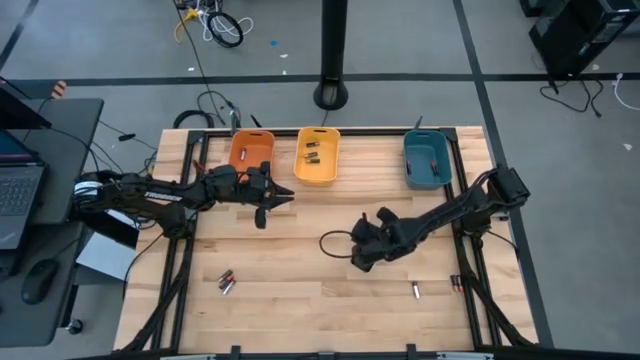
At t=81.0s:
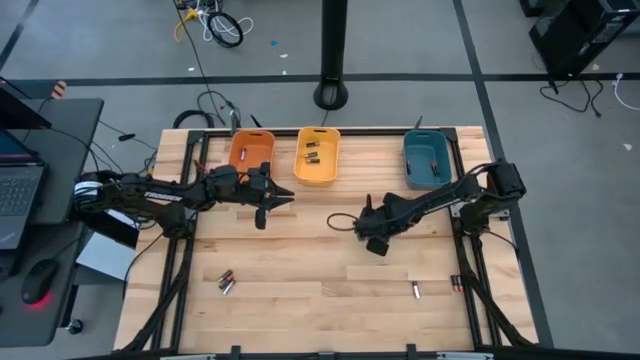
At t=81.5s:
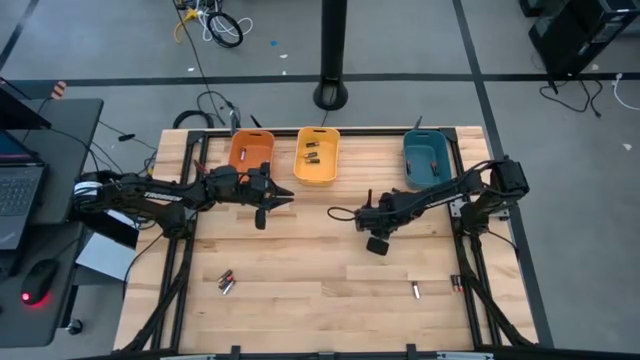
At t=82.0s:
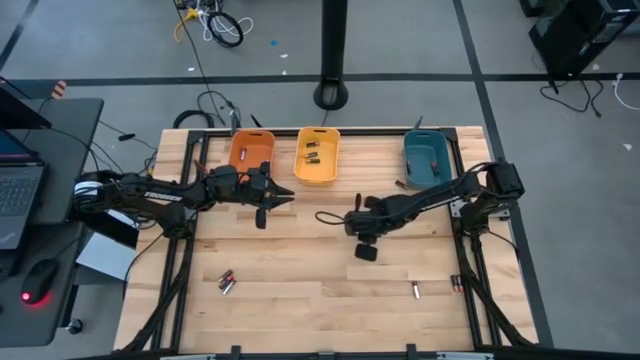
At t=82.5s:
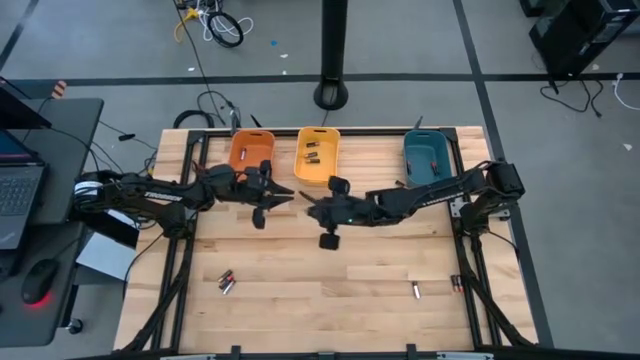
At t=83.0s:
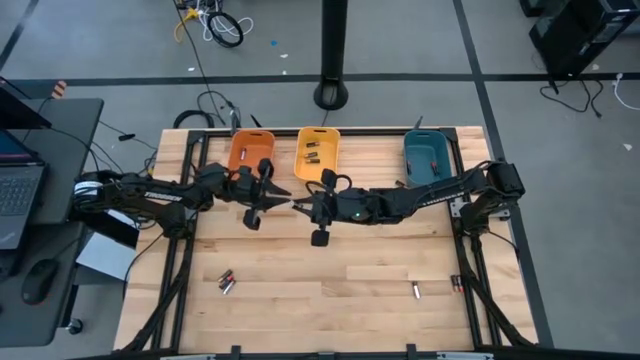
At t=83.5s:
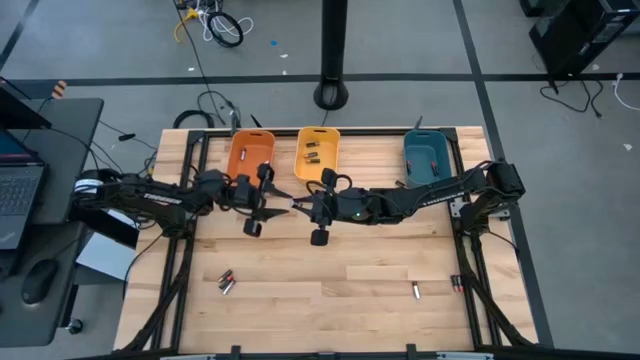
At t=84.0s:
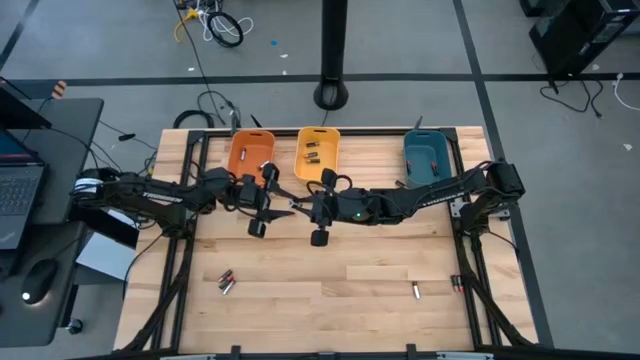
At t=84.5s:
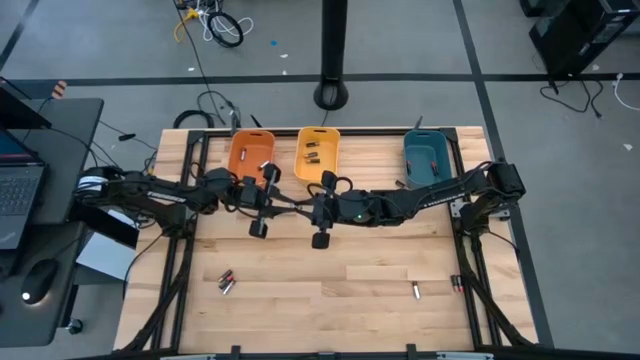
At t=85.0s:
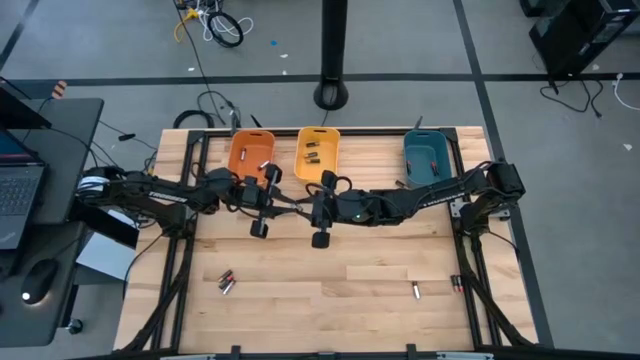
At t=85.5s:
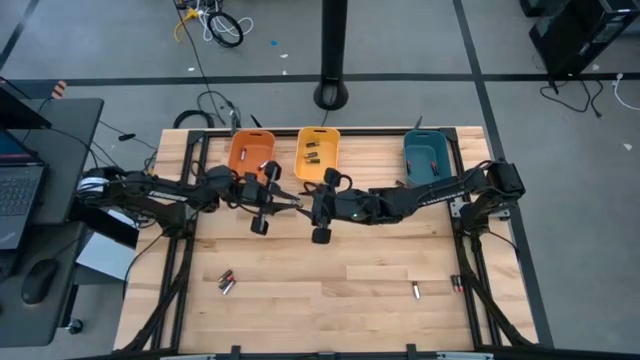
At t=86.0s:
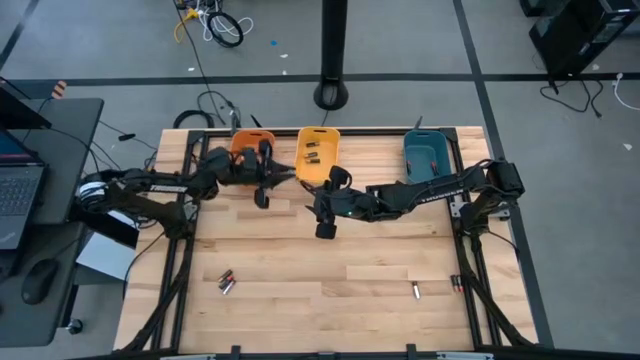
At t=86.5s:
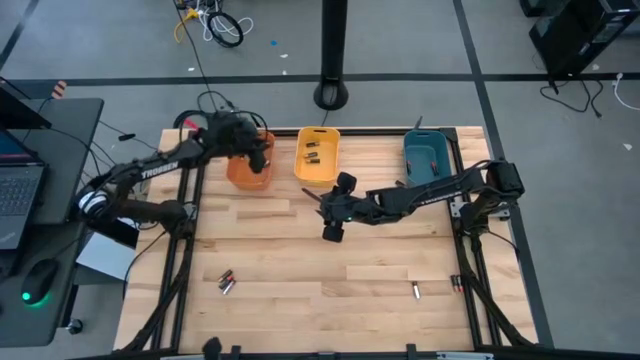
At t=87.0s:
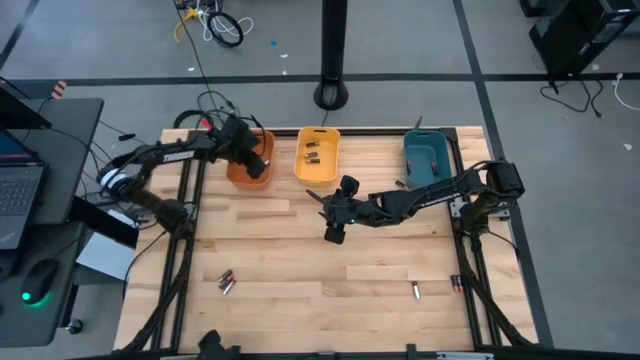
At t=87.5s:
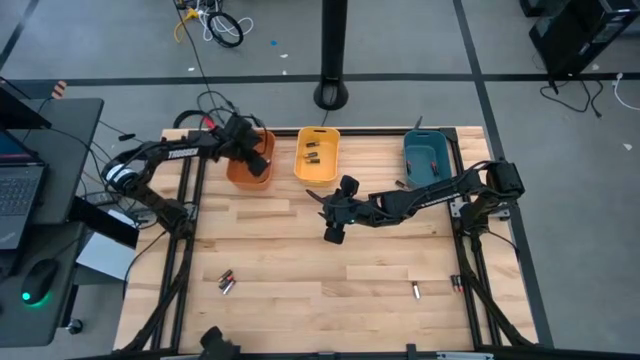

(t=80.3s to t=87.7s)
Task: Sort batteries
Put the silver battery into the orange bin

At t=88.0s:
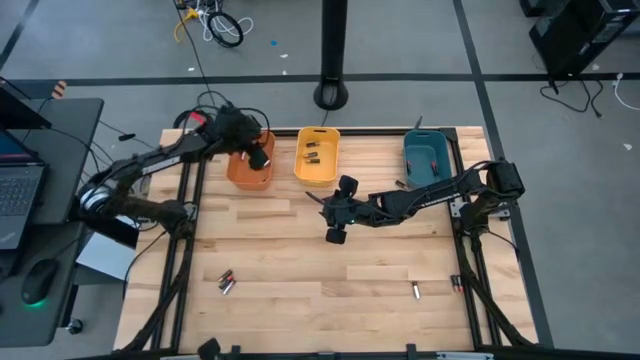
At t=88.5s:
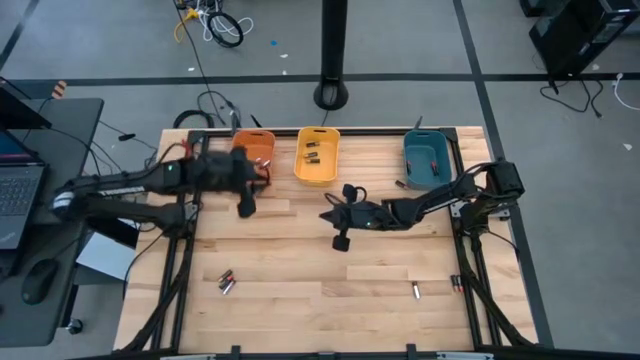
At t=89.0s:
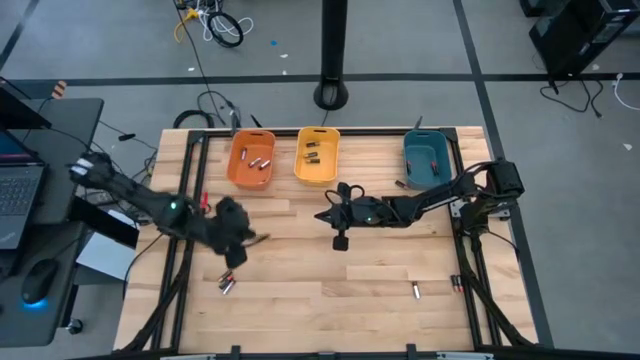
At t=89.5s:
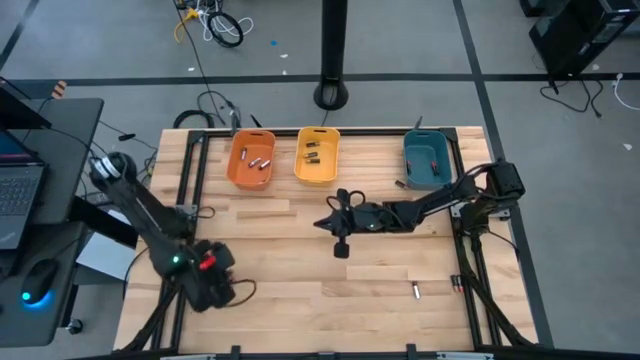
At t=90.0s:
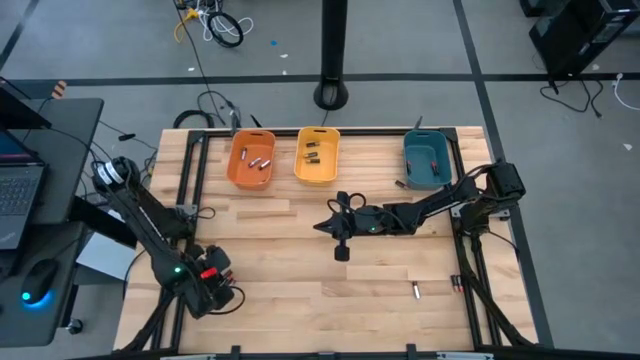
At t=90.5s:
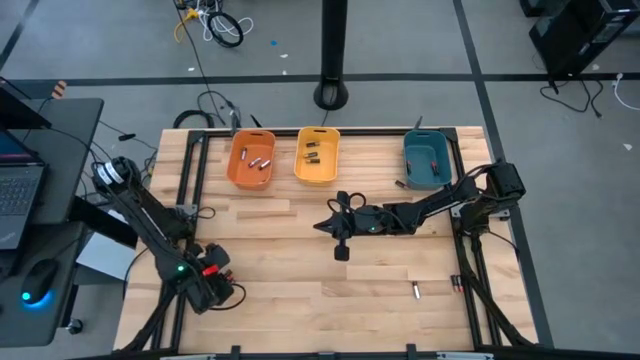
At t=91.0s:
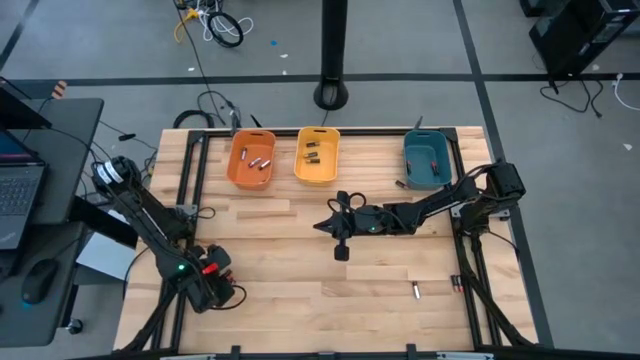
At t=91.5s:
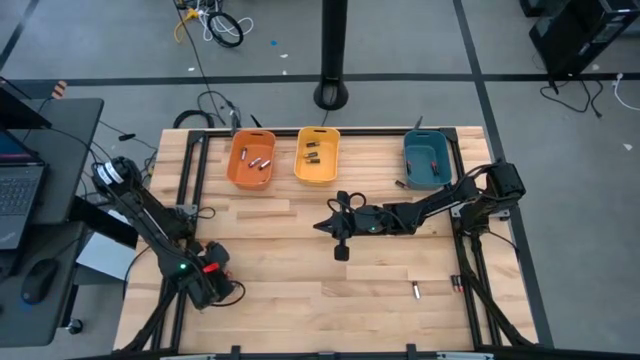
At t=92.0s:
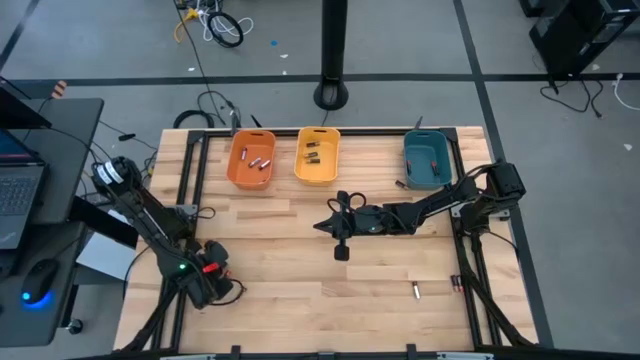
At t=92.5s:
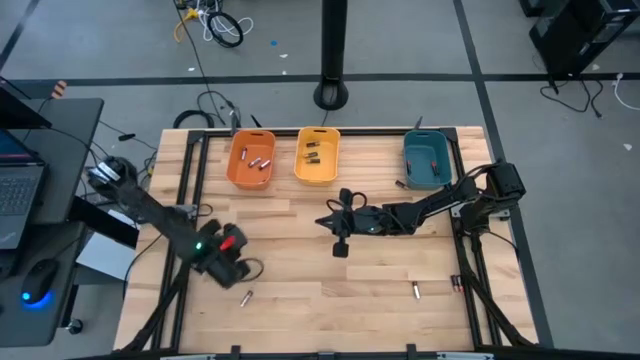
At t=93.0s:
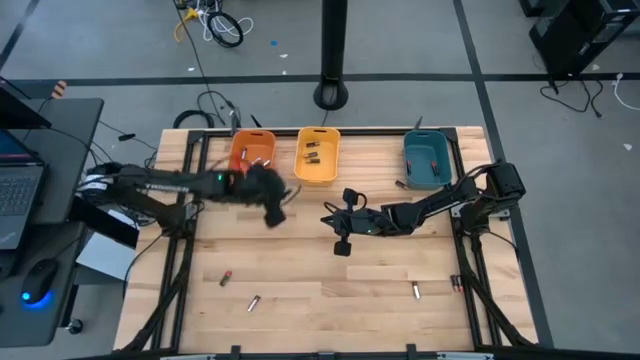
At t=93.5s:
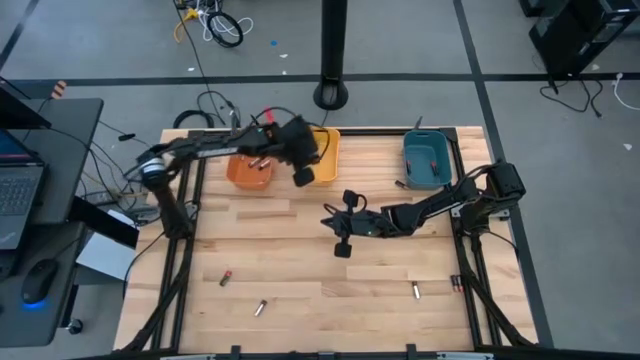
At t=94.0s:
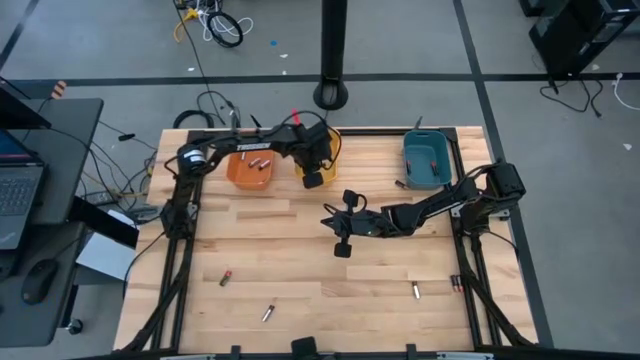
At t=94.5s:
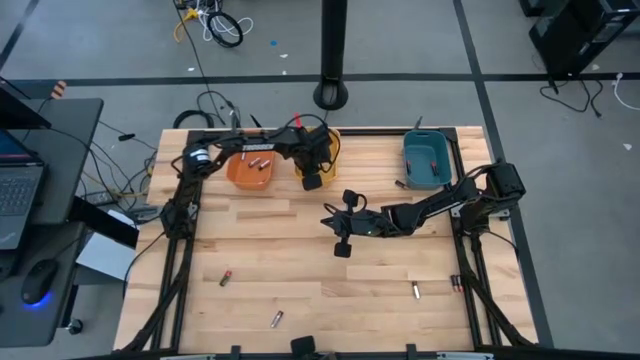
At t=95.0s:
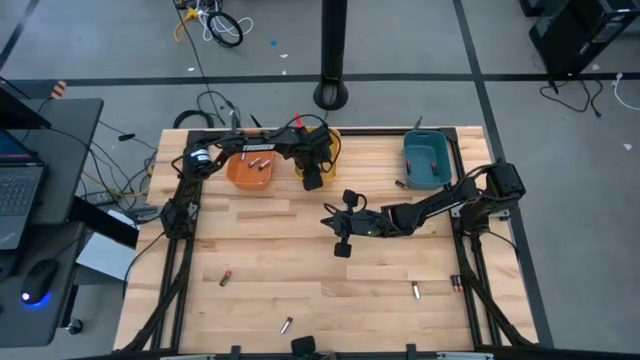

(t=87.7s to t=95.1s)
Put the black battery into the yellow bin

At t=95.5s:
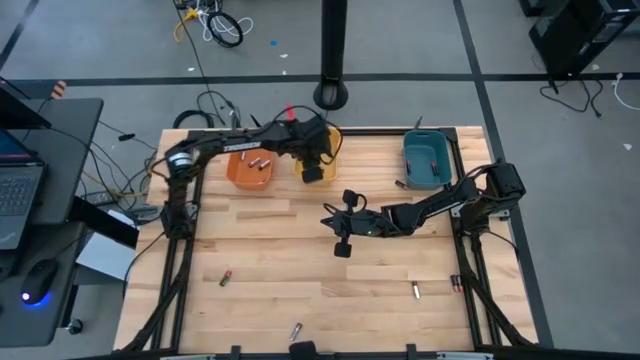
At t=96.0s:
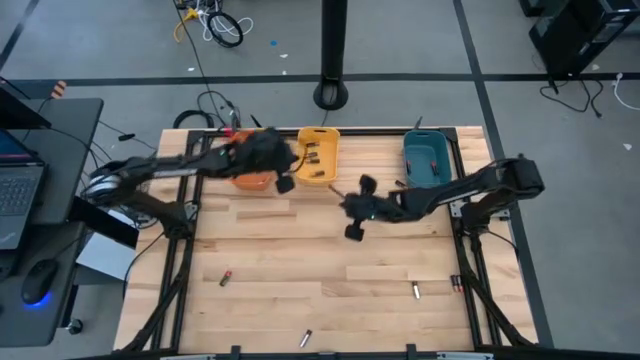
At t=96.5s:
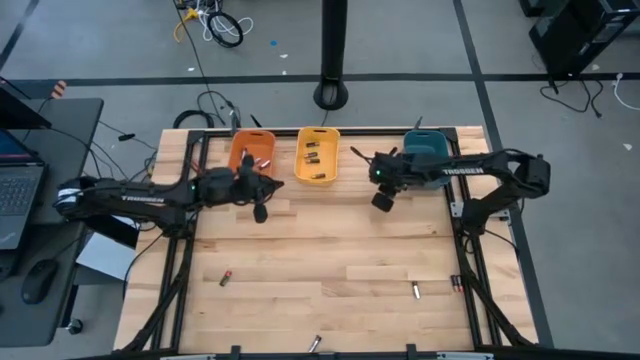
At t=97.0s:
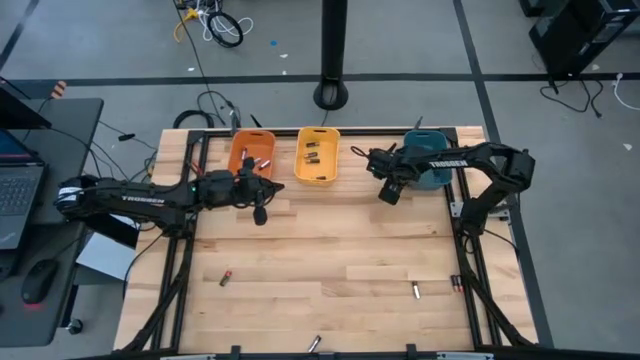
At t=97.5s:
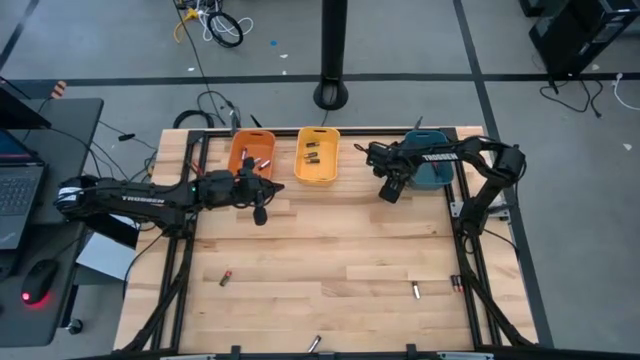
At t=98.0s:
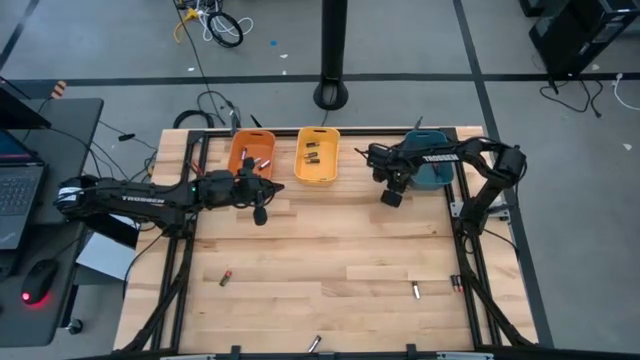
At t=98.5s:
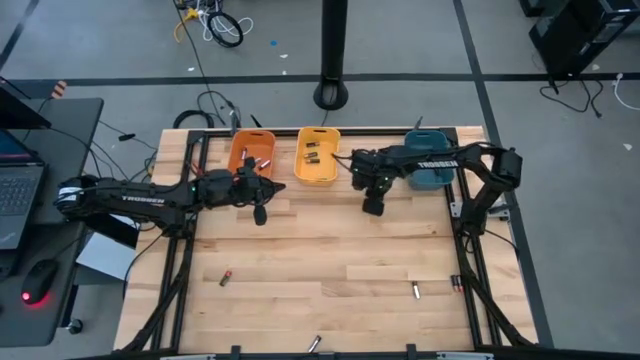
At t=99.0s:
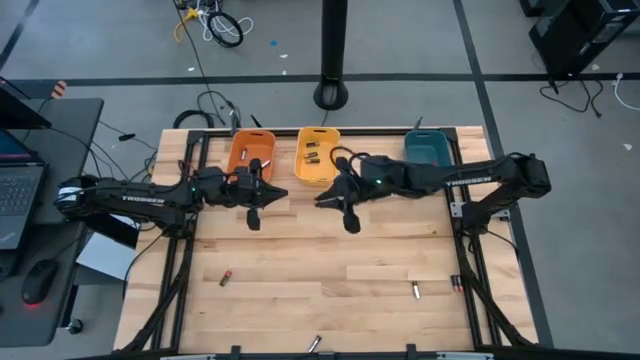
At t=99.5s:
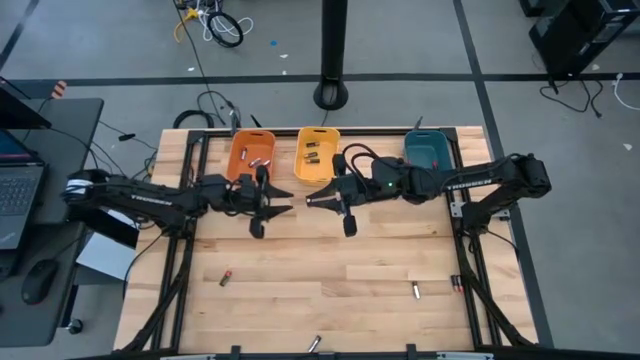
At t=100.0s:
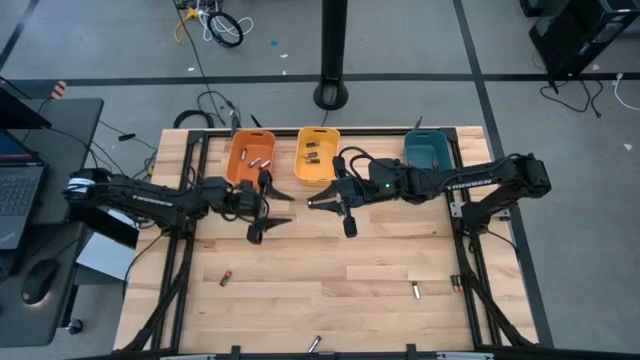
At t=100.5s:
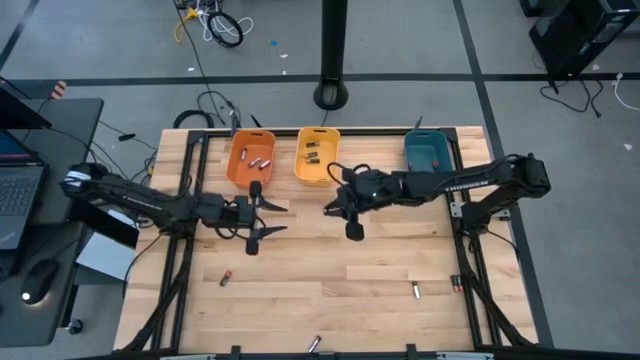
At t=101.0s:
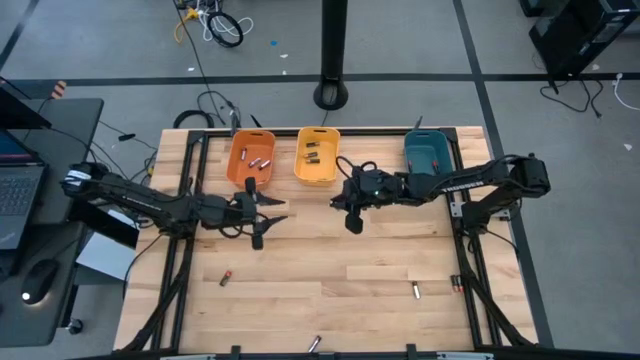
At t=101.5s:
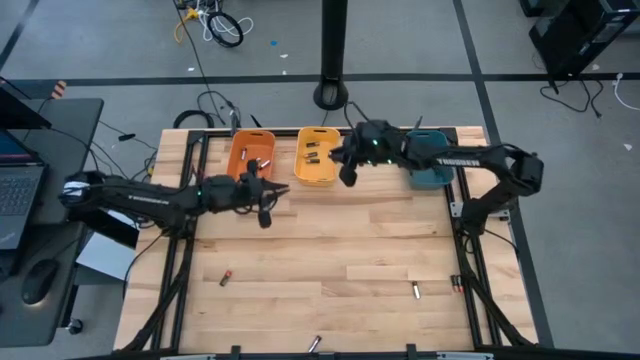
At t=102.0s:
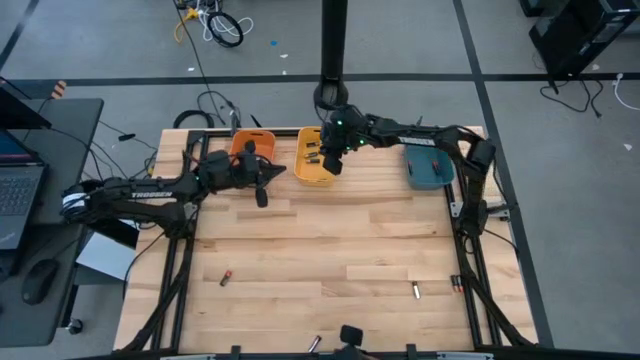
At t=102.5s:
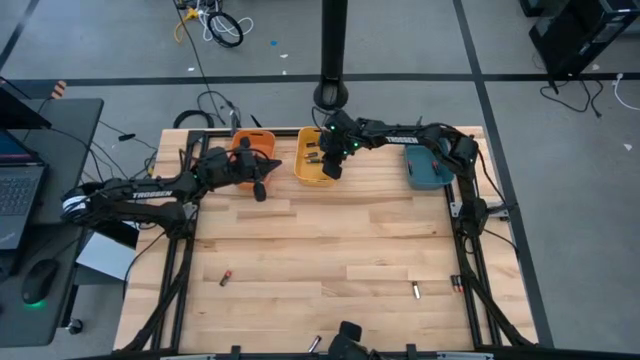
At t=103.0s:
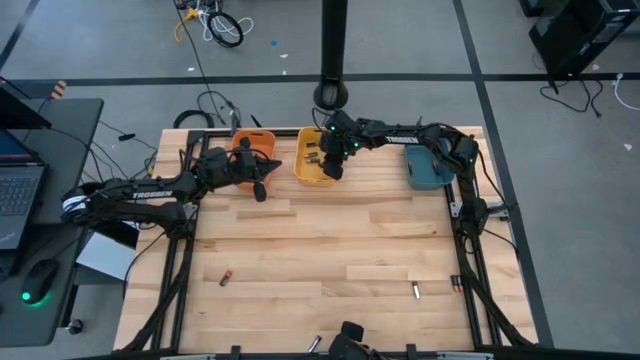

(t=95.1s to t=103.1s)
Put the black battery into the yellow bin
